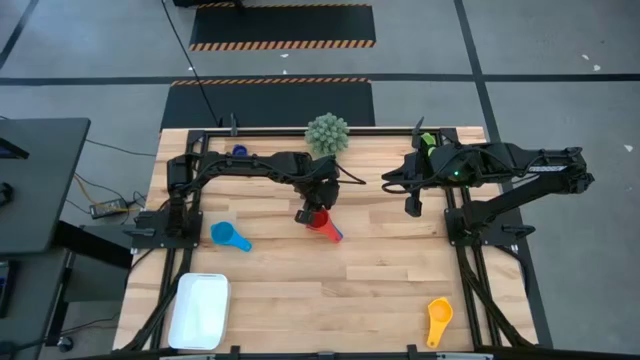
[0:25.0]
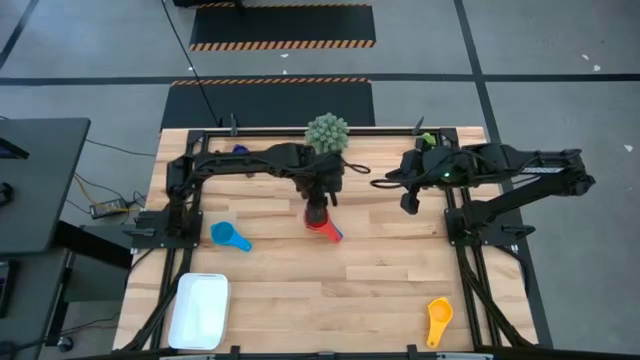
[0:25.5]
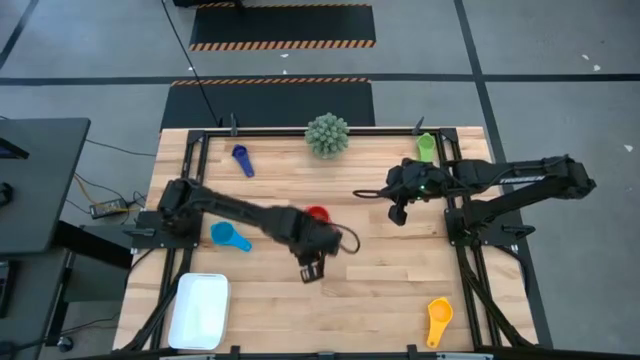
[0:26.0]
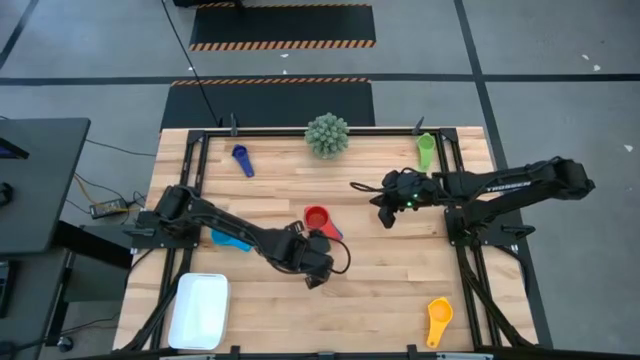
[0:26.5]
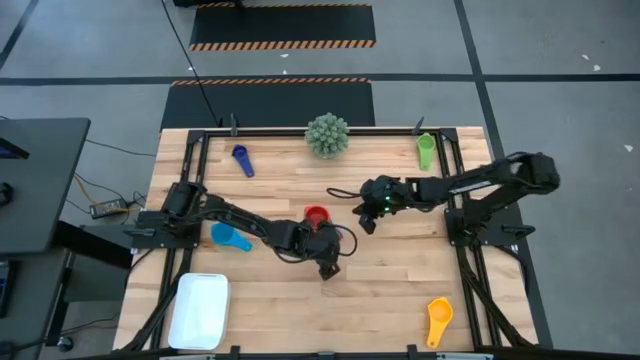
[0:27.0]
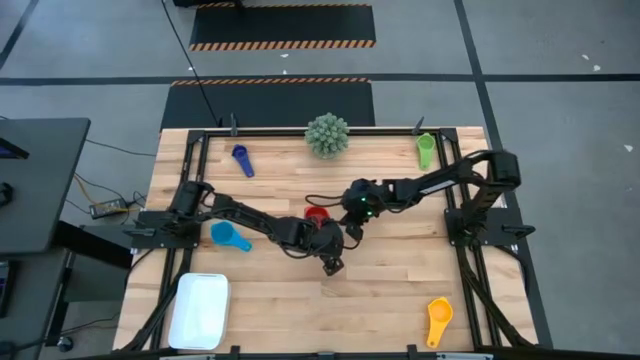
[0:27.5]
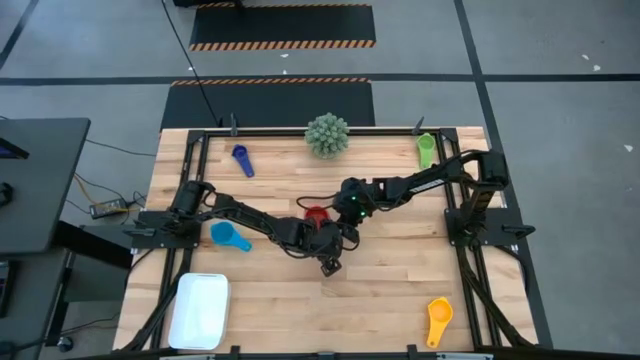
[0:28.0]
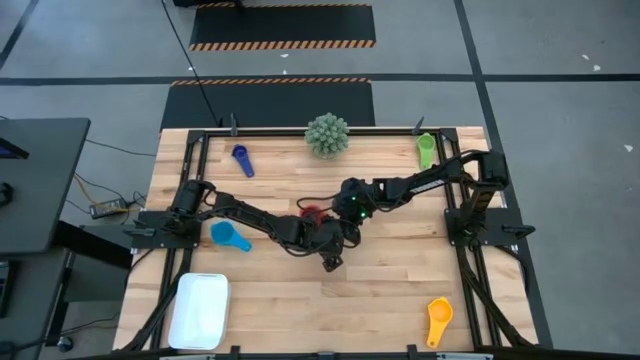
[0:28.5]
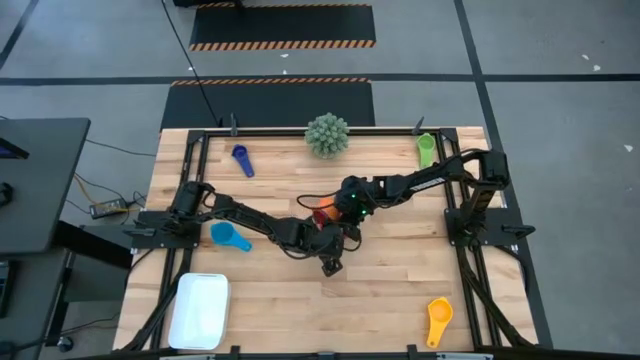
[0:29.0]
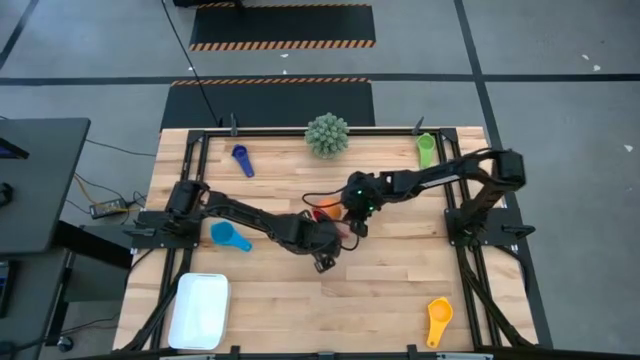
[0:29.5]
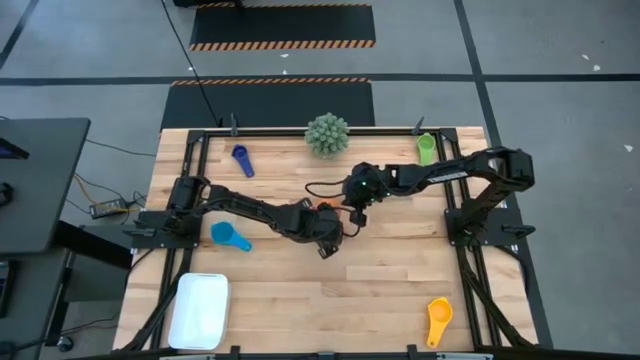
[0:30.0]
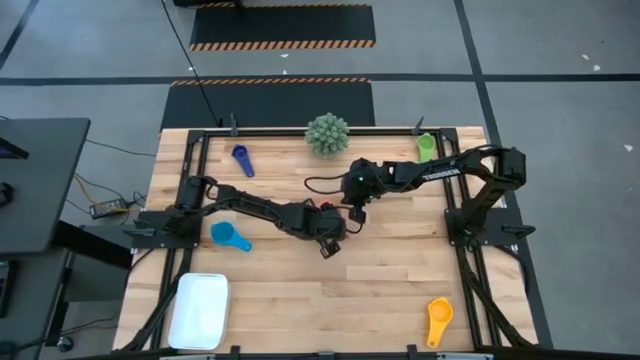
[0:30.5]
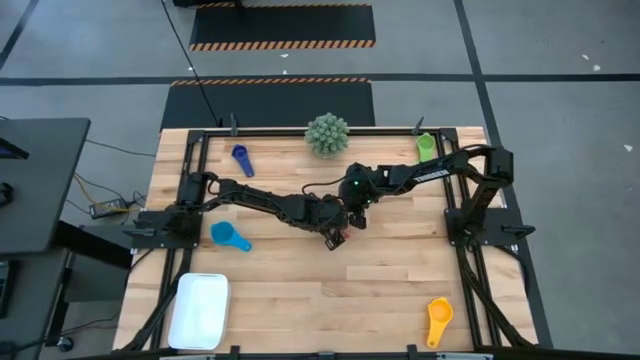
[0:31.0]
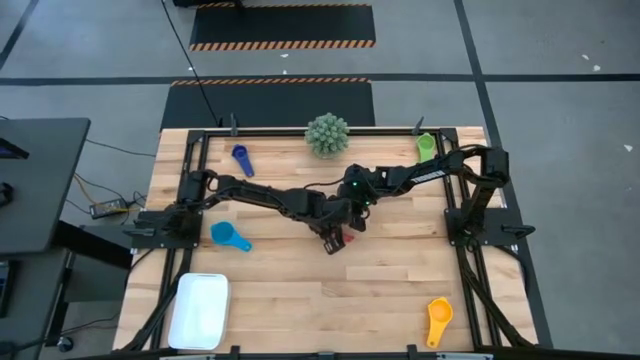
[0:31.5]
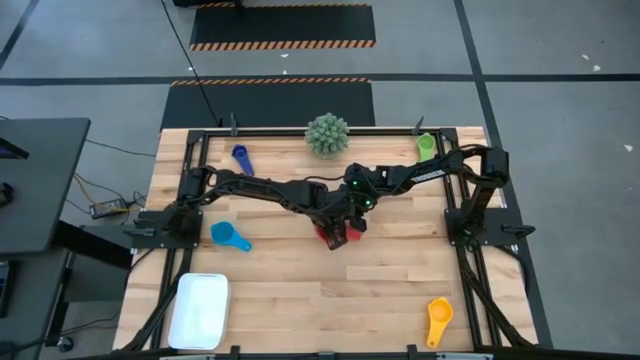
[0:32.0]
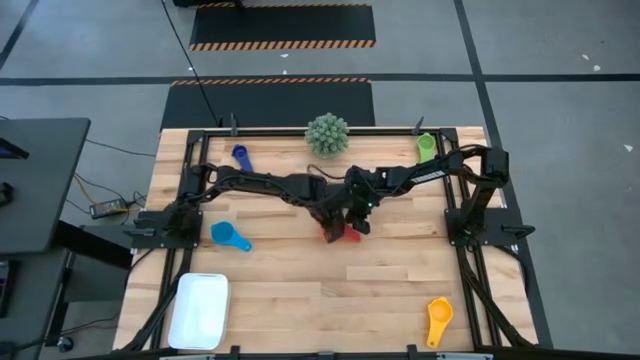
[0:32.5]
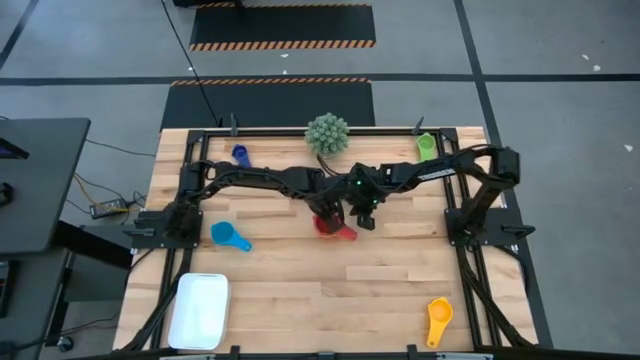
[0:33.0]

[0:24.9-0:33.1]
Task: Nest measuring cups in basket
Adjust the stacked measuring cups

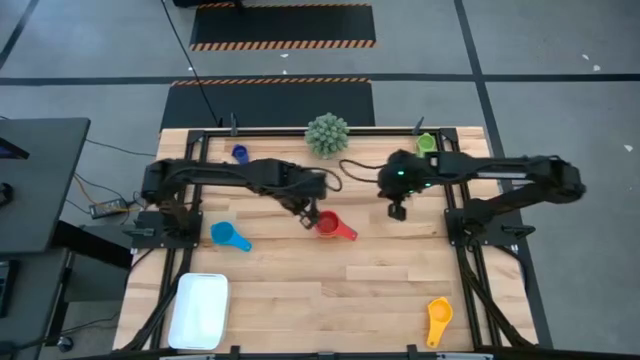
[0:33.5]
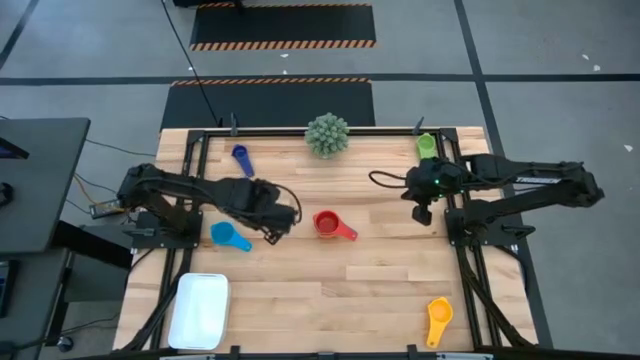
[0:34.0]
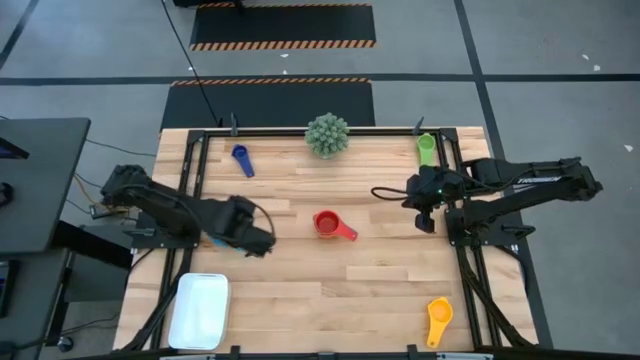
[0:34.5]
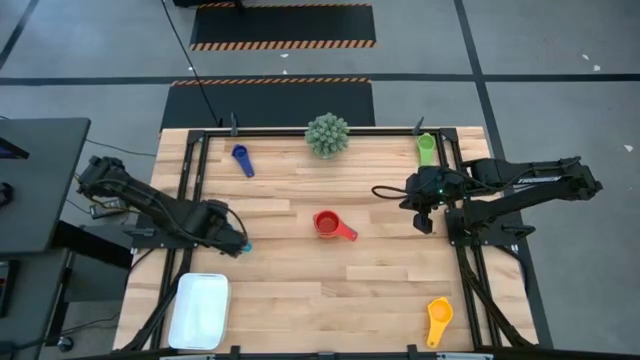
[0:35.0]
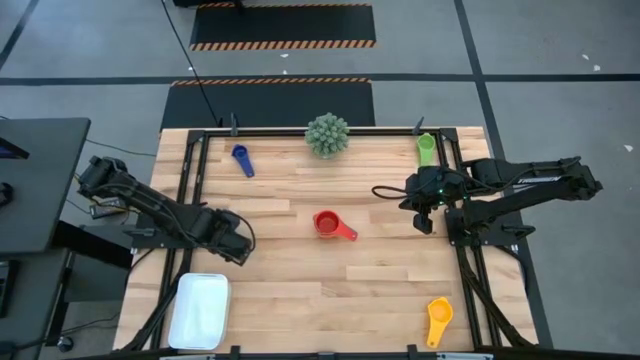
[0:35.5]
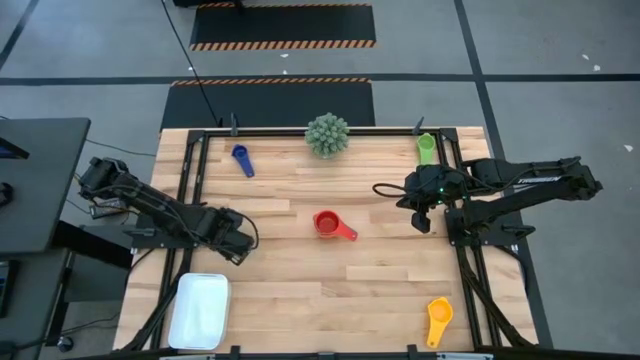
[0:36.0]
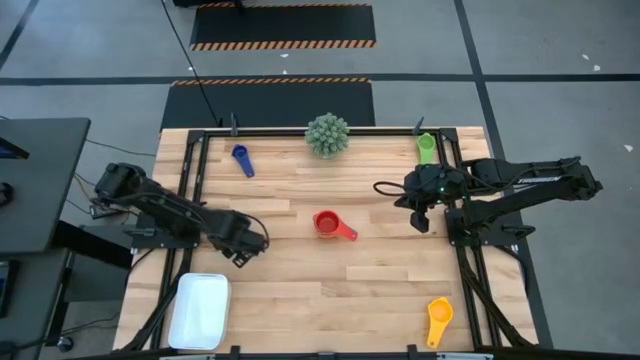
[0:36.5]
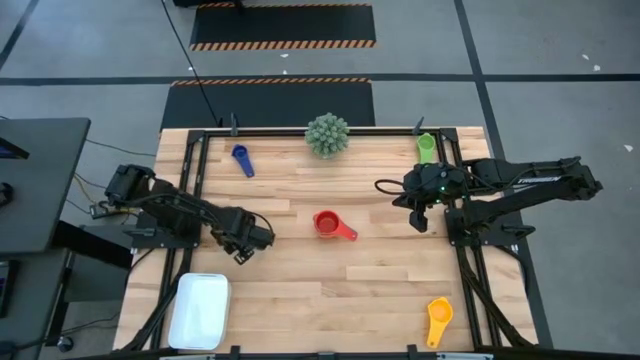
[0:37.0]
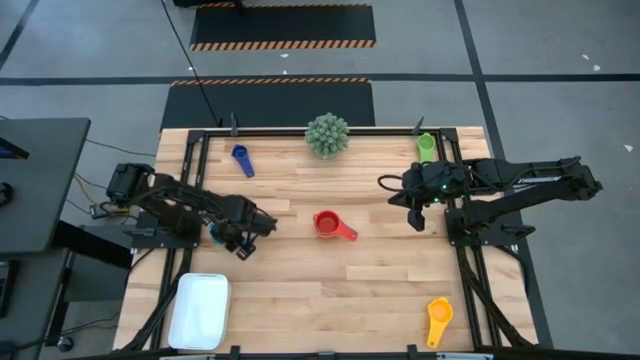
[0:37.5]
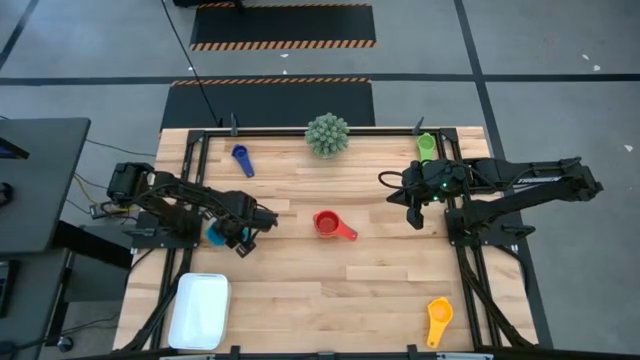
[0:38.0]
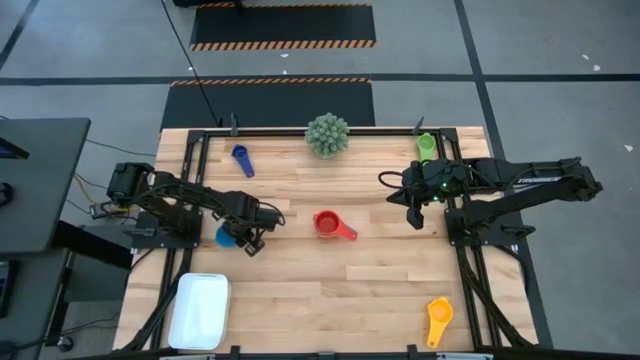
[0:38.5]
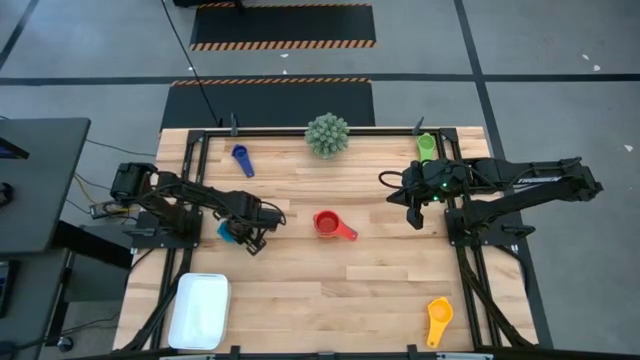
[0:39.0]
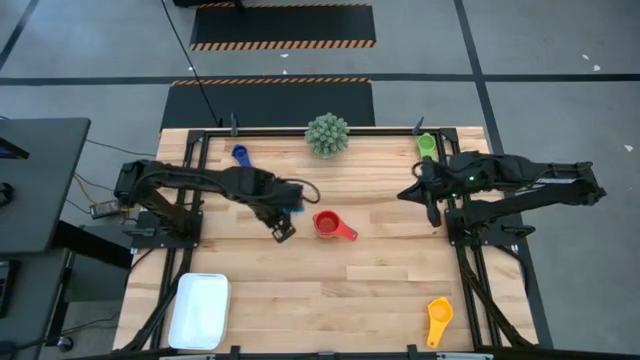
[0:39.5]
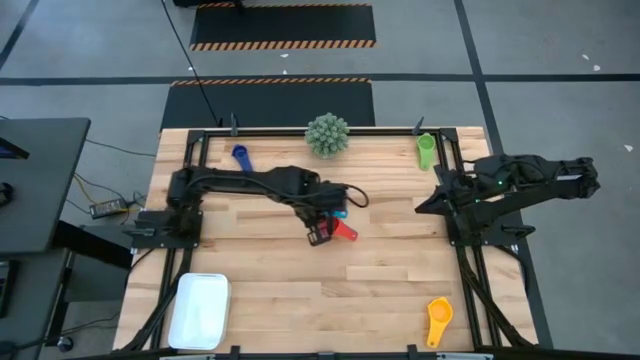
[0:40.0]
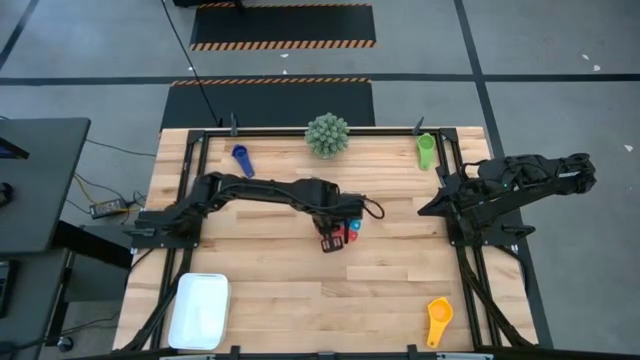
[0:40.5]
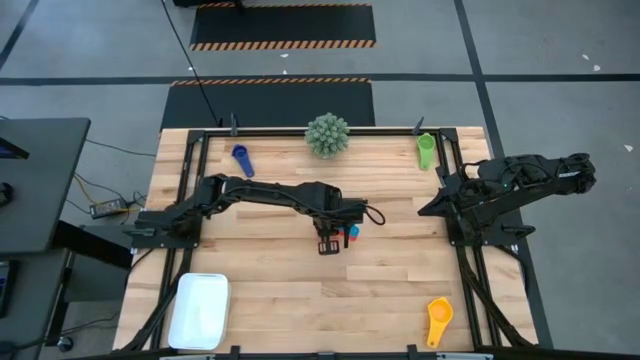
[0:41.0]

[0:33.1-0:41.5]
Stack the light blue measuring cup on top of the red measuring cup

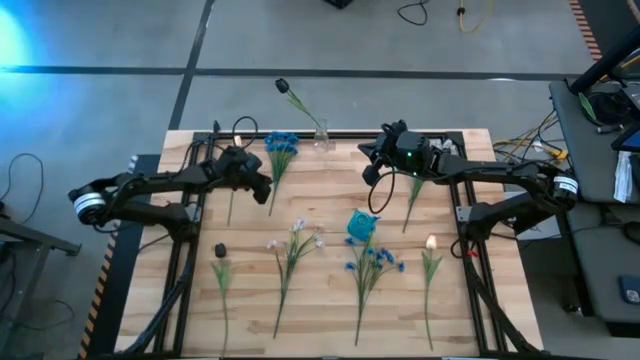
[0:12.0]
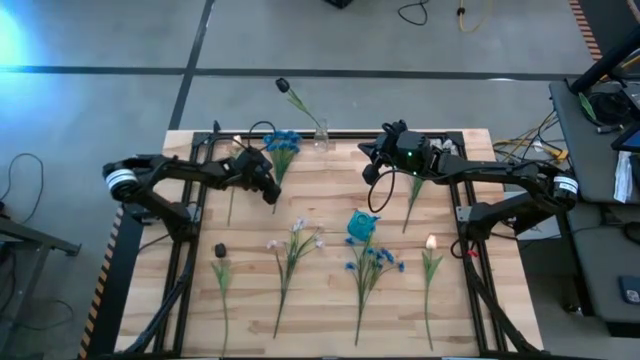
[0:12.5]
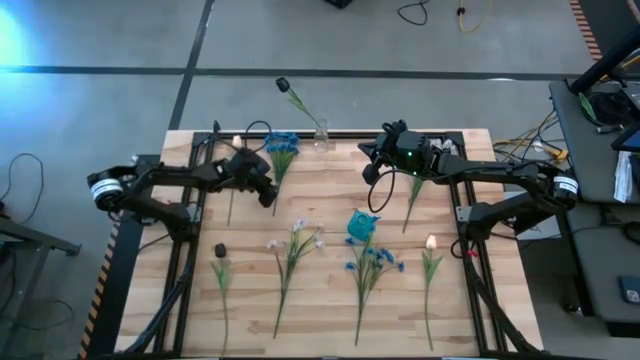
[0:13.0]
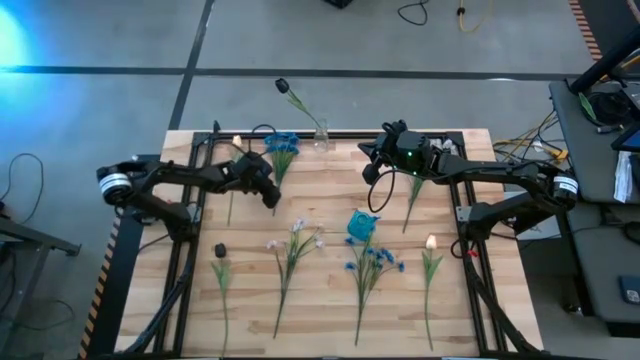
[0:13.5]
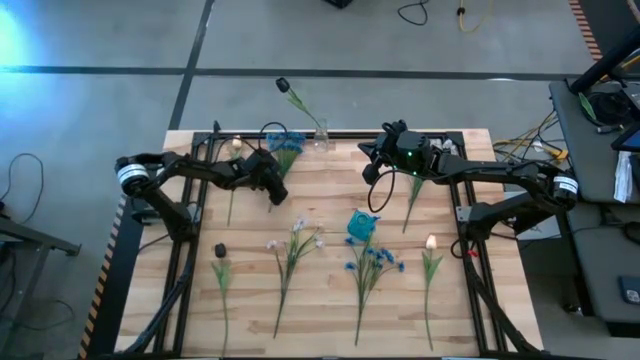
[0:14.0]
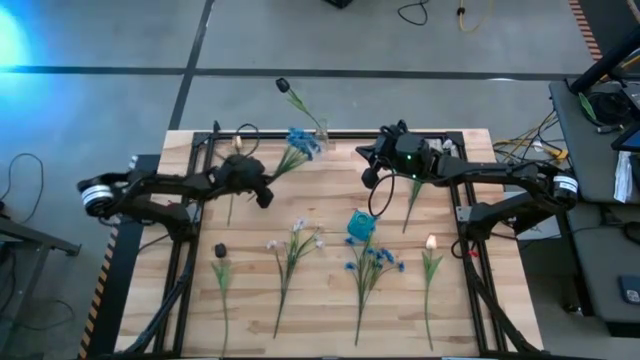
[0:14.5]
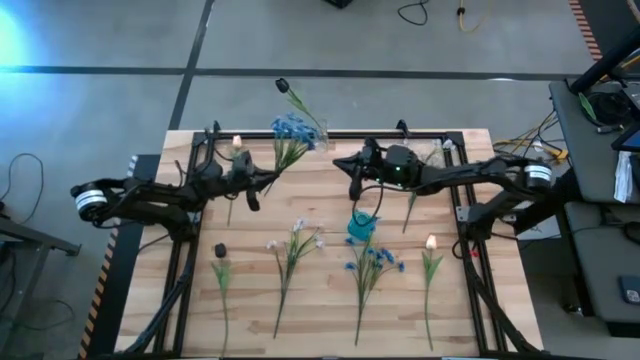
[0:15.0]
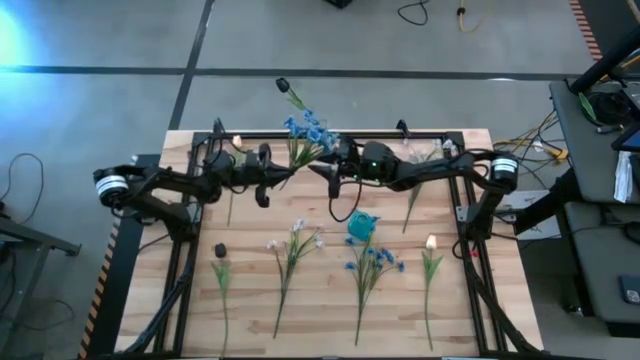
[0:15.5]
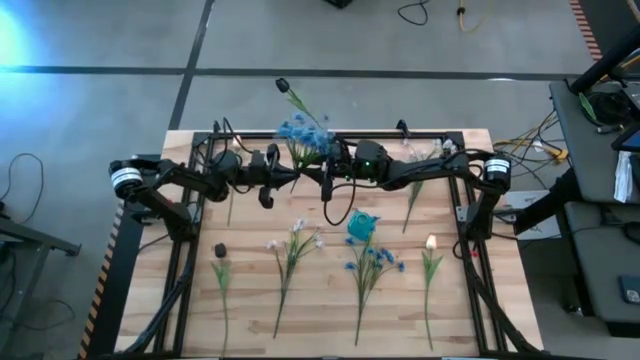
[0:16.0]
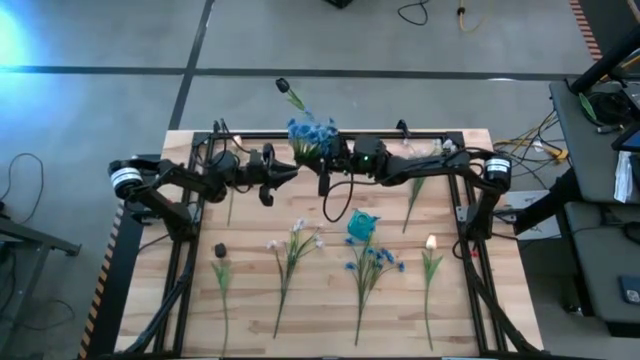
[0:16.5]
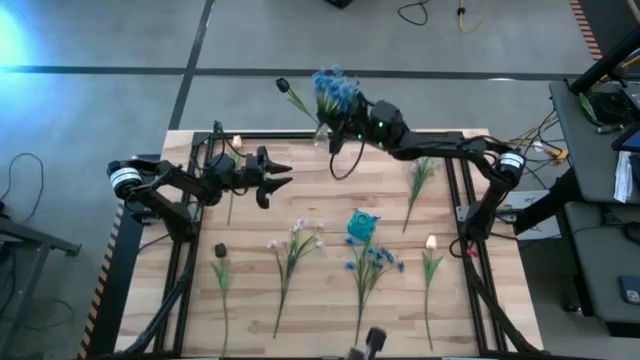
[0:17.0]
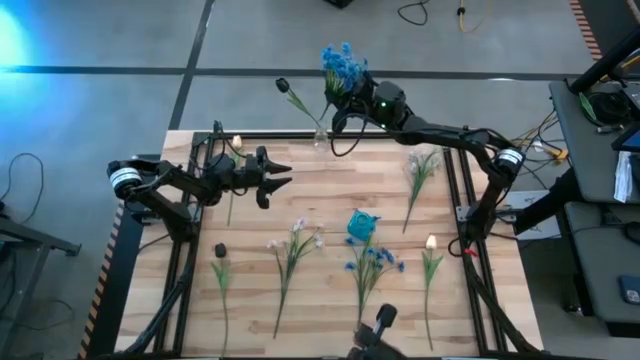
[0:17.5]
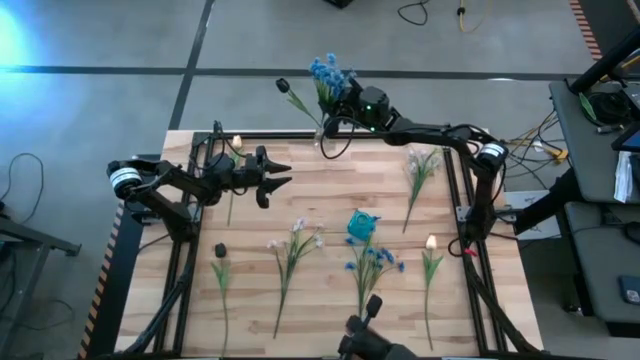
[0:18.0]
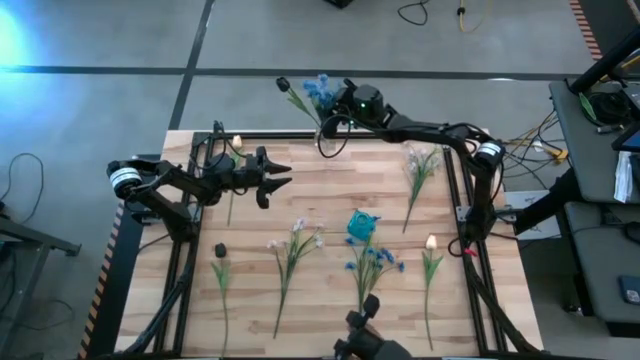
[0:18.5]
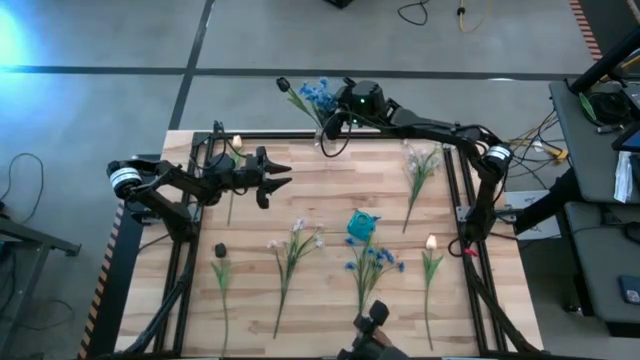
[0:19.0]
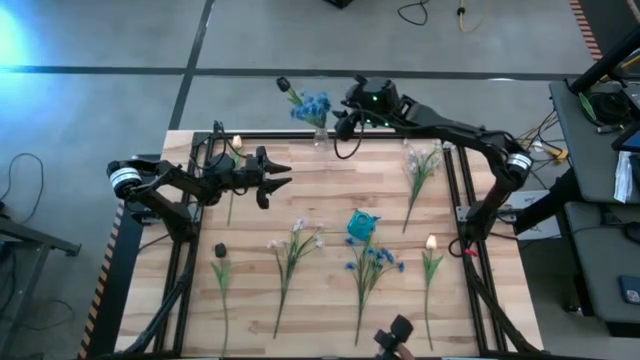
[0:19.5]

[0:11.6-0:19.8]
Task: Sort flowers into vase by color
Put the top blue flowers into the transparent vase
